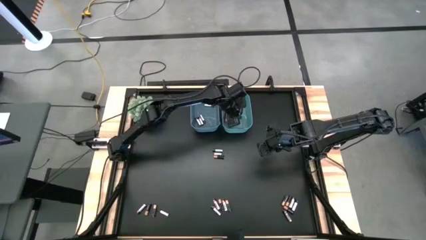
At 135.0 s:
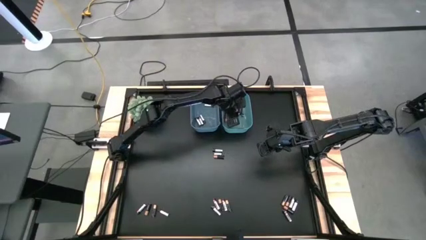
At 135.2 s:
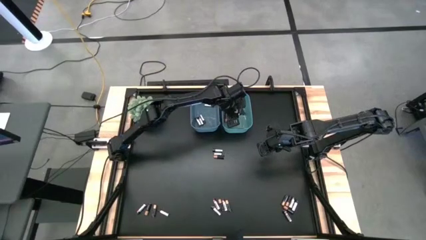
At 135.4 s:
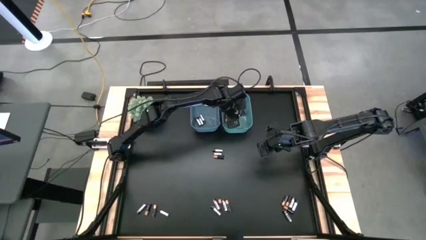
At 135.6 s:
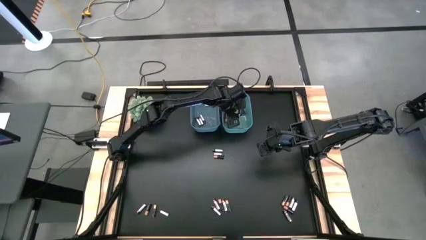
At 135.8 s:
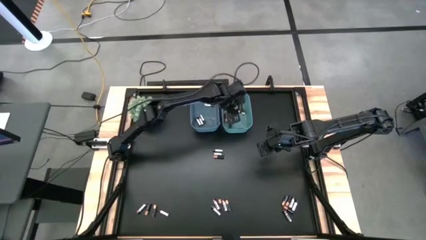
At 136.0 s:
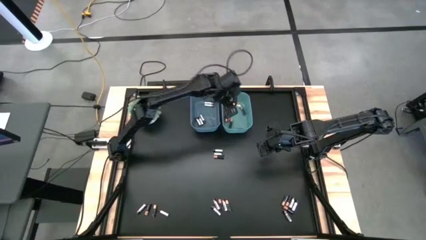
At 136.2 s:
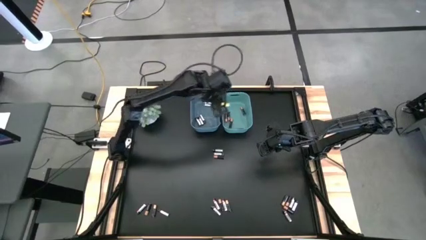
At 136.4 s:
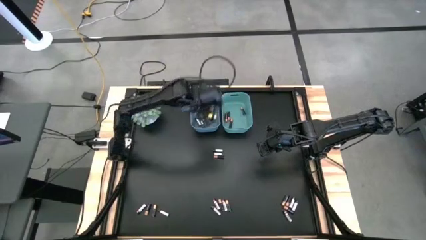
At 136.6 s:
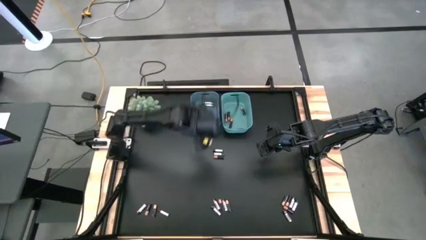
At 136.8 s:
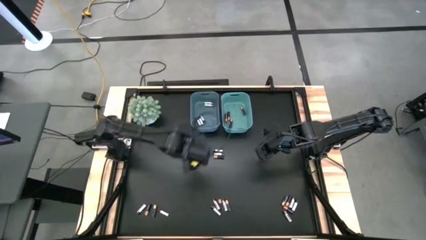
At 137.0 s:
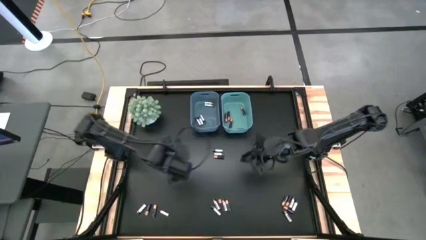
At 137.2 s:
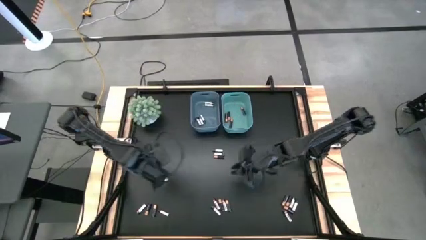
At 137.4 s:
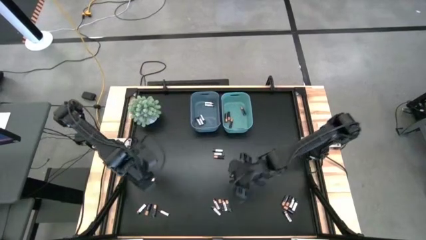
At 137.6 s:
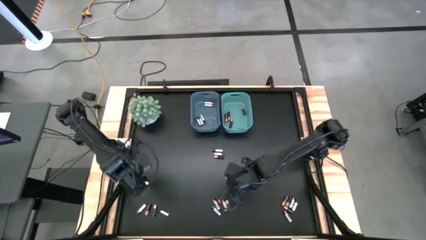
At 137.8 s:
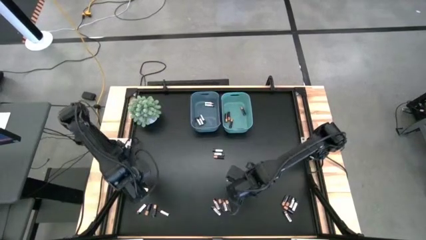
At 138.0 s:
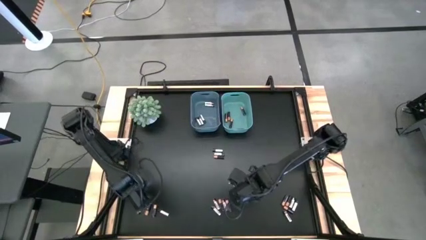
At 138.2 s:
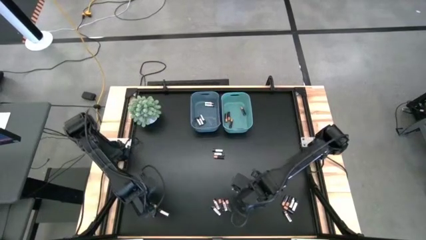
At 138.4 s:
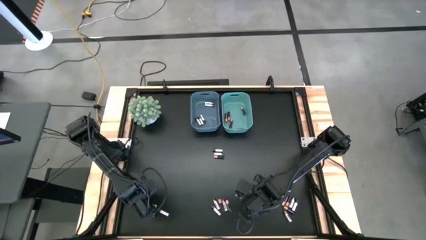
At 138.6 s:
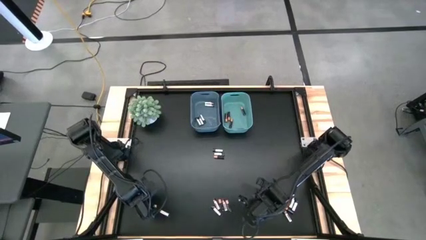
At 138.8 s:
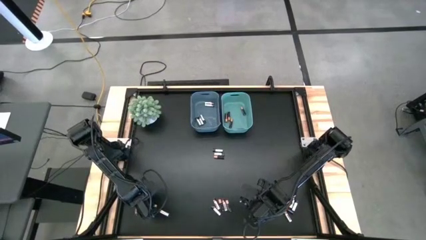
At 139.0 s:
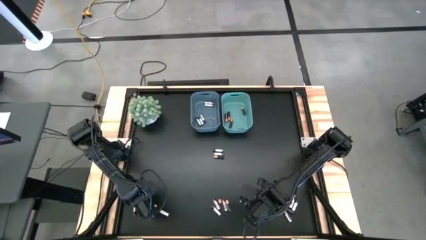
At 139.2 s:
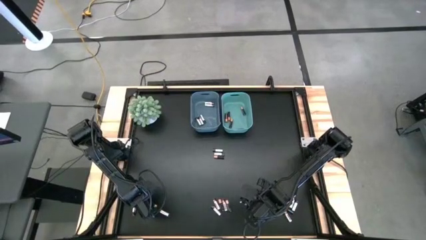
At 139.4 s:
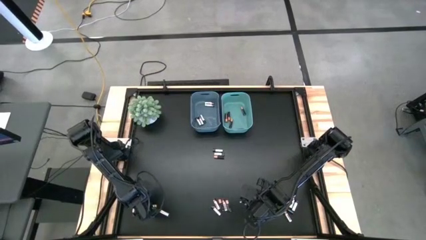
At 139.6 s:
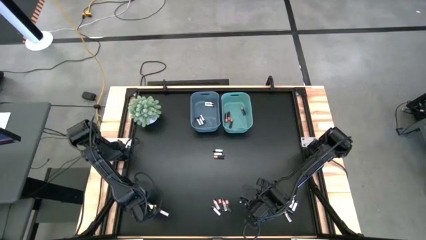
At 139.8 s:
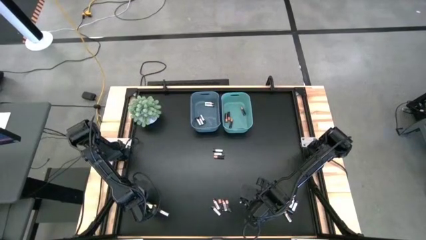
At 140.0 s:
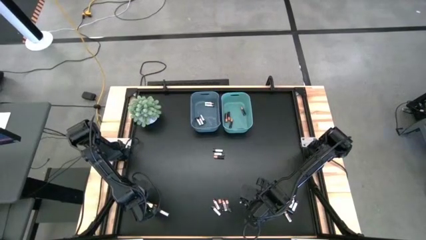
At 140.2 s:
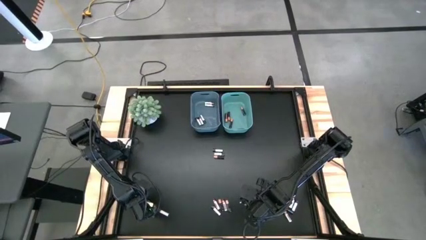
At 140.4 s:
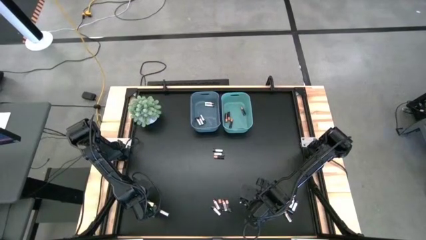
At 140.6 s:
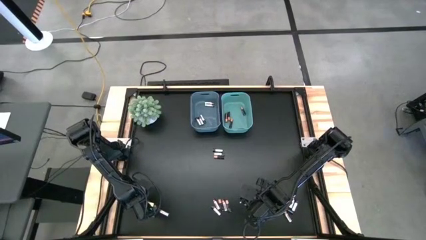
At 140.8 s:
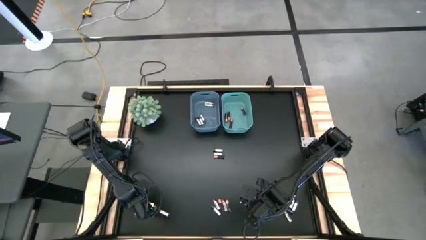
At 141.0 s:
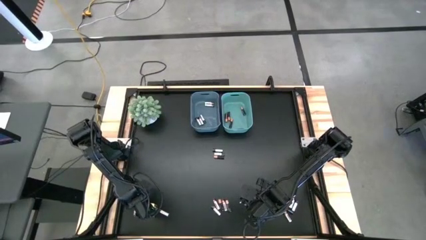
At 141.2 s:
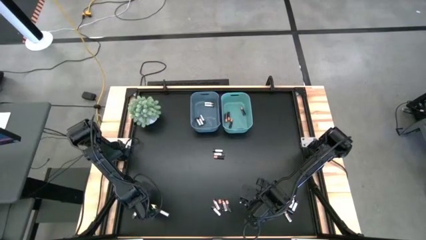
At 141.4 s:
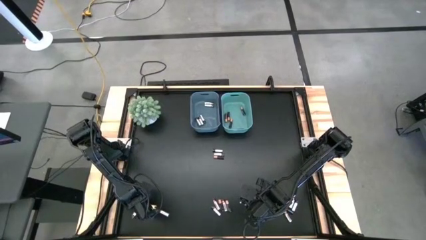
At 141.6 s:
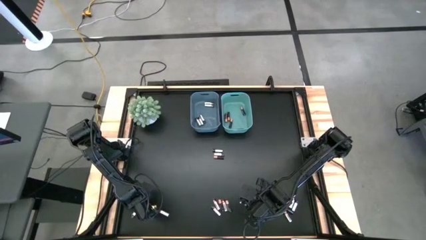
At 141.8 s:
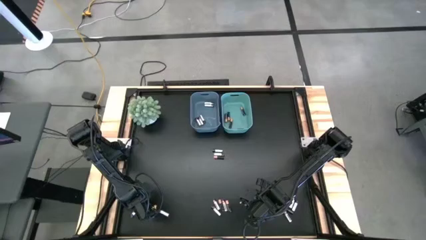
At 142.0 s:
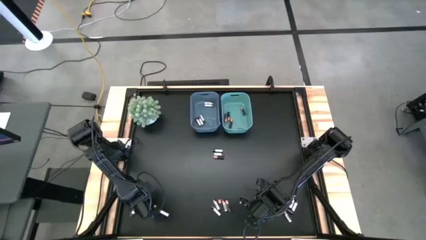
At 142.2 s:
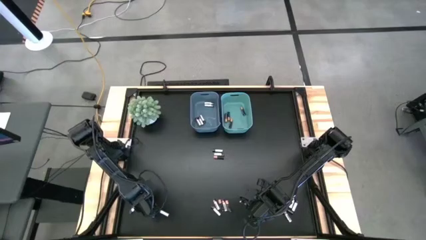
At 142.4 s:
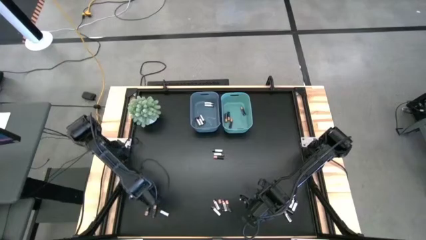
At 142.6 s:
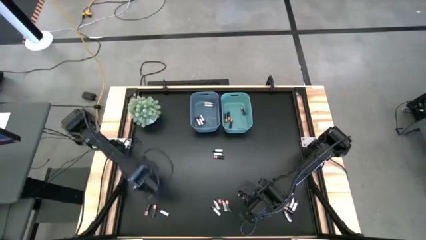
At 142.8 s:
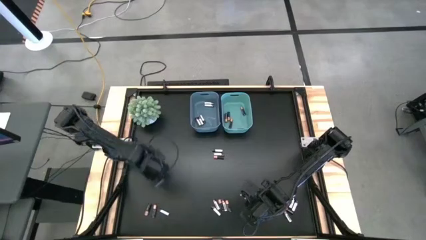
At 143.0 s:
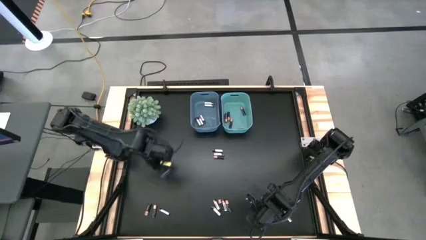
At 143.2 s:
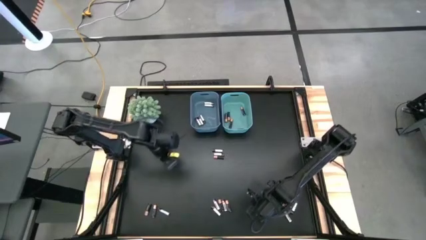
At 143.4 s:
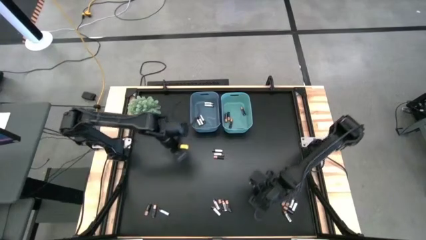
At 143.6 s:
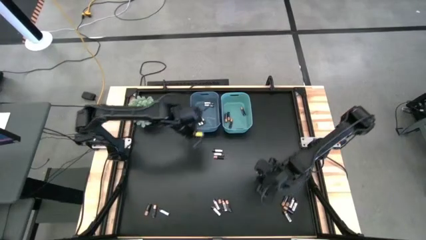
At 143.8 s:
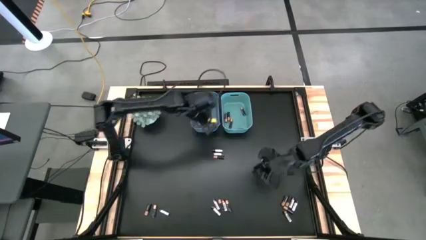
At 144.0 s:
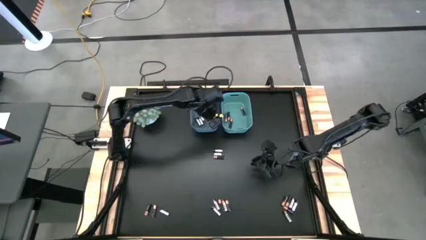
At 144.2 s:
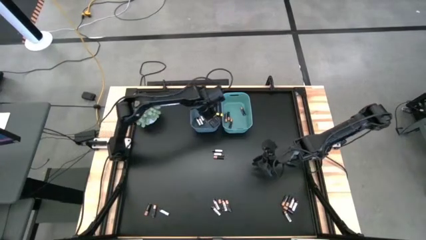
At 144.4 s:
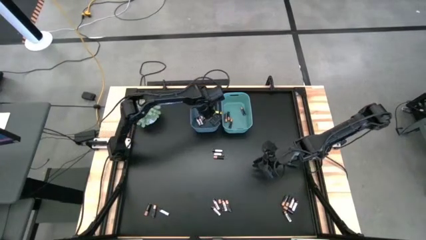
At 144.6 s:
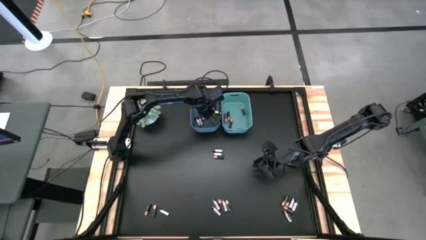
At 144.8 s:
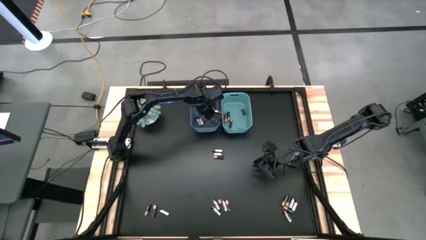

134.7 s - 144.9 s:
Task: Sort batteries
Put the silver battery into the blue bin

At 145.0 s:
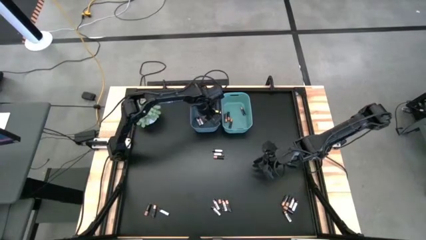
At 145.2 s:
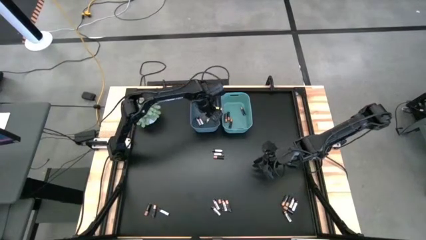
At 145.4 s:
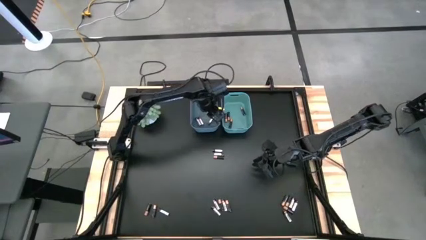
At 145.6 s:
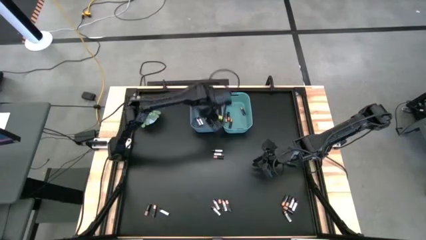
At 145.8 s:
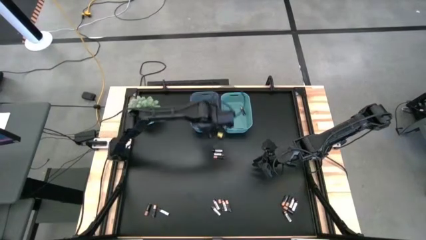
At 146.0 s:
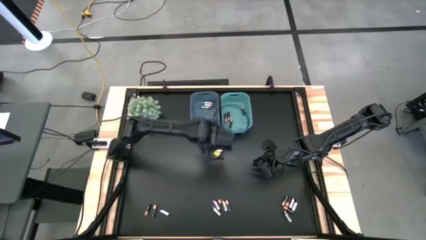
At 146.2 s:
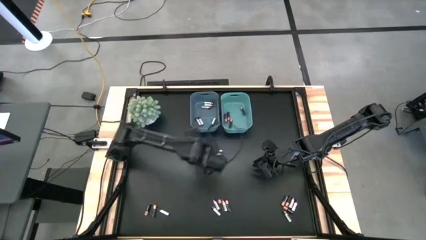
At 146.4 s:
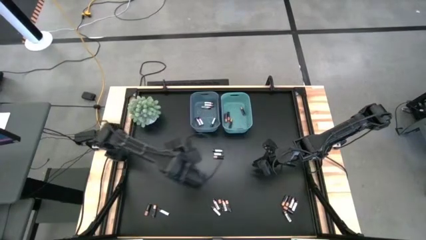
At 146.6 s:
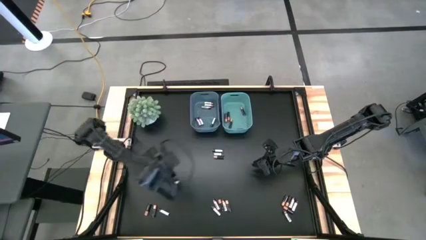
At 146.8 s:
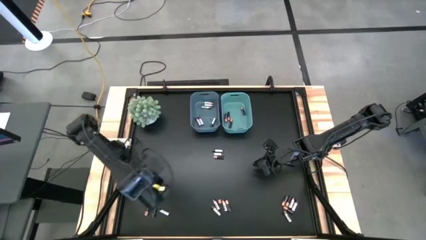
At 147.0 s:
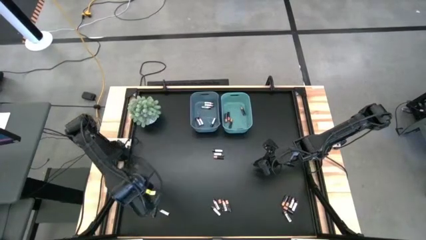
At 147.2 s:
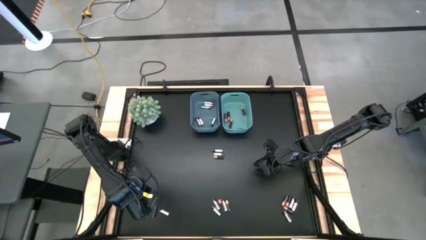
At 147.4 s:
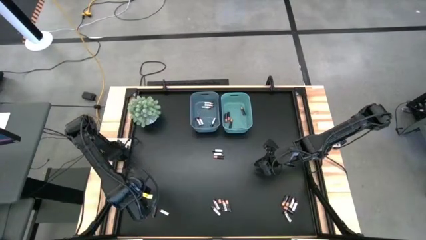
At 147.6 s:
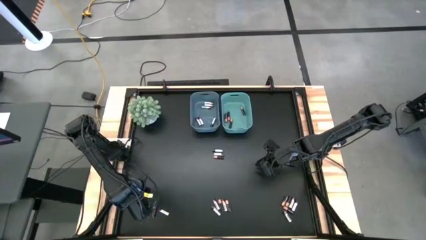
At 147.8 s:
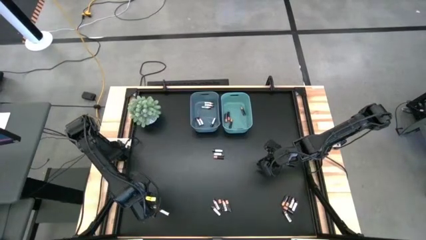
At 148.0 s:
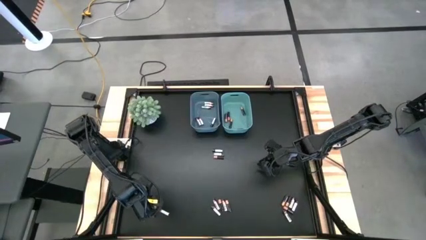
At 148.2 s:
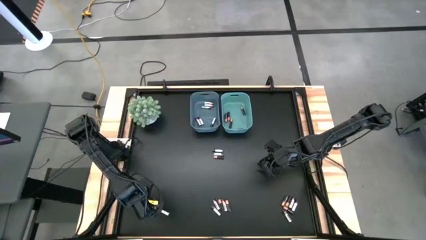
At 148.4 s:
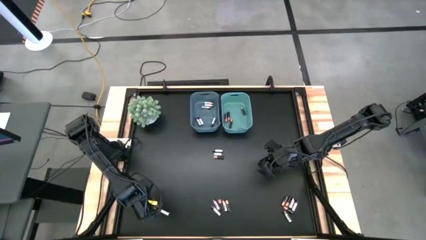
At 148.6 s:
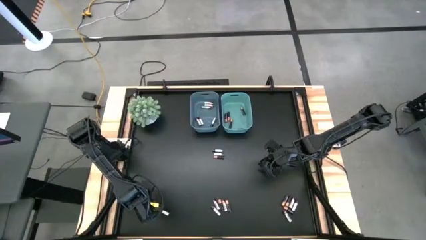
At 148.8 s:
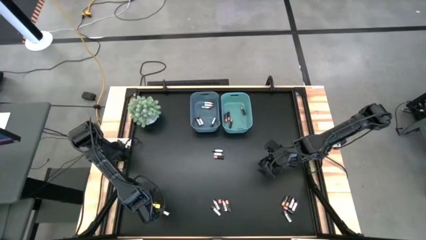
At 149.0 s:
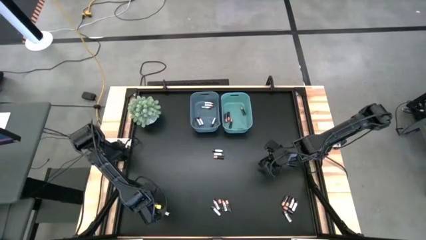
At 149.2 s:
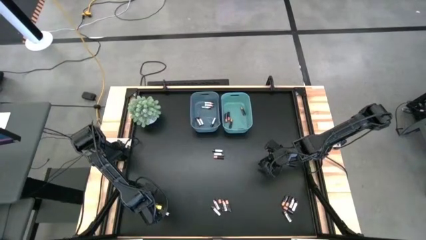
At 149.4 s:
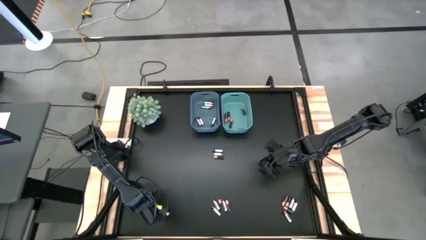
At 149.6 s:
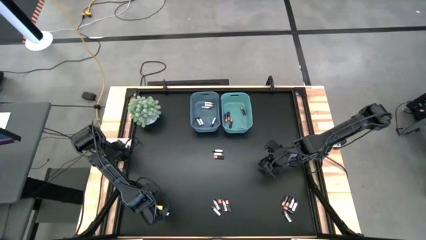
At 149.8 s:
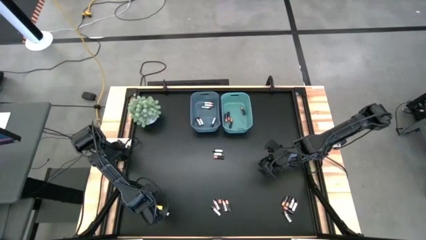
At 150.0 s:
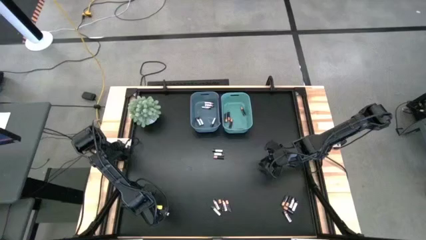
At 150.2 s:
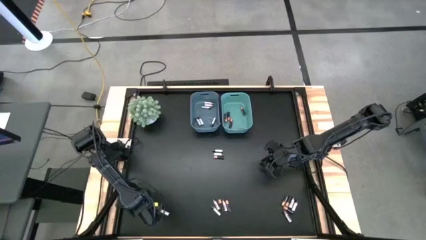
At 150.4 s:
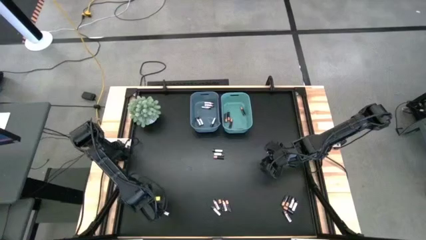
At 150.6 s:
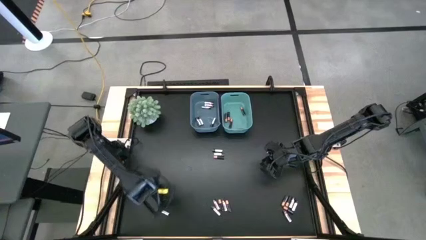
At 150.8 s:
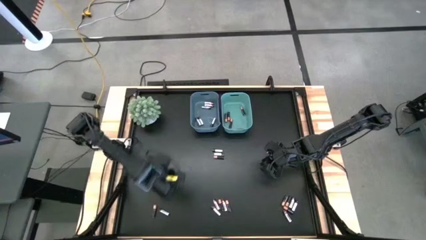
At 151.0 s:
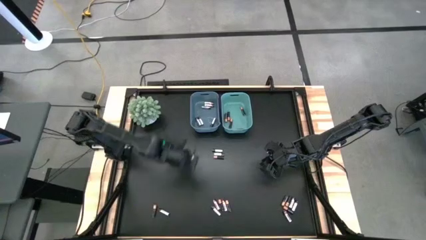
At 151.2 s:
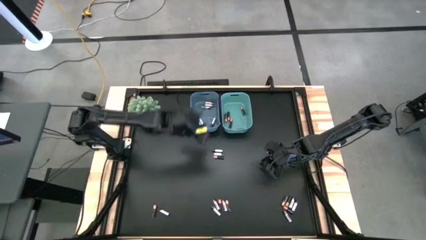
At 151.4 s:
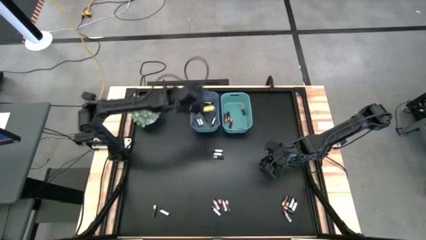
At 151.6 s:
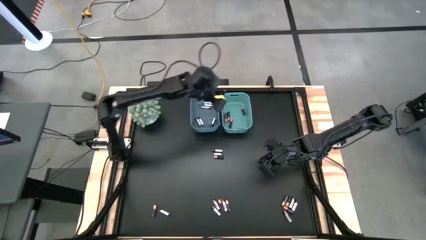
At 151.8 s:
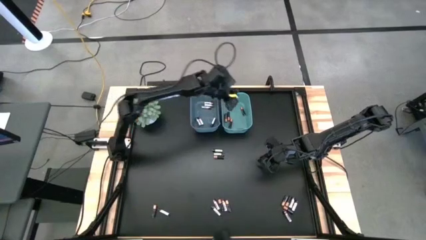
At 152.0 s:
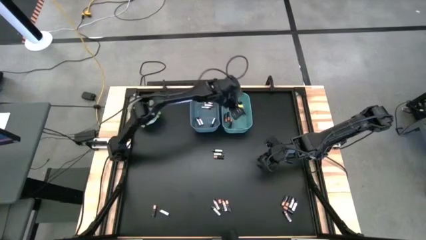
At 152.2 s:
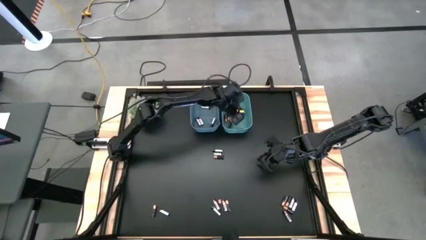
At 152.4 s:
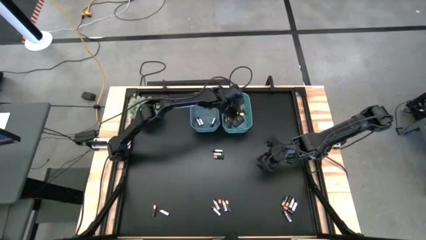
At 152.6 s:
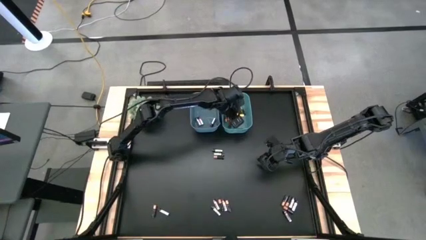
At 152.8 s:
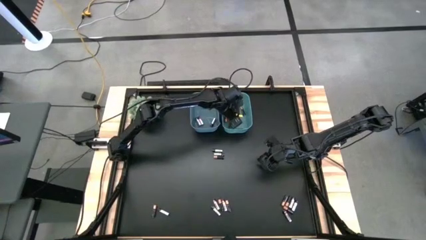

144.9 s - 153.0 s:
Put the black battery into the green bin
